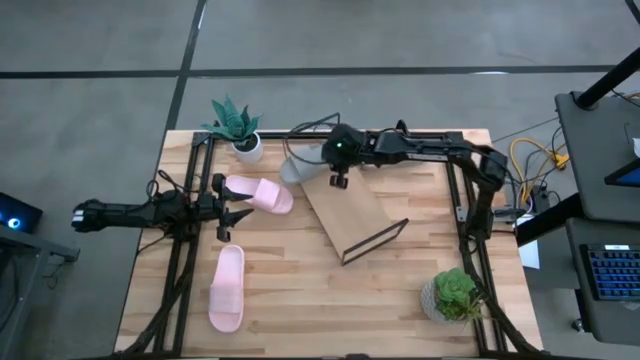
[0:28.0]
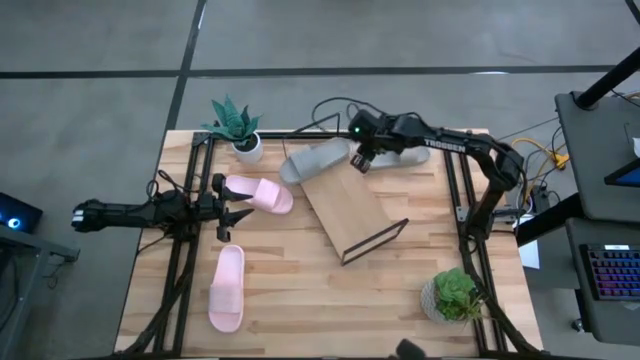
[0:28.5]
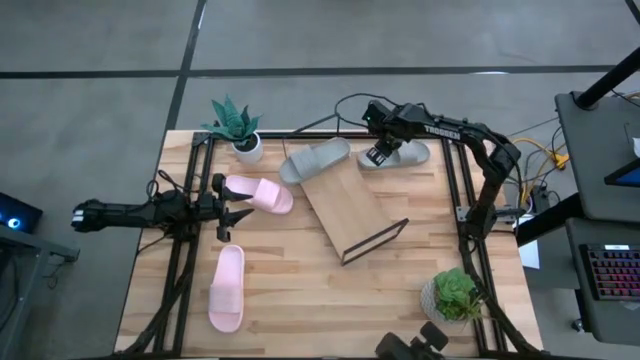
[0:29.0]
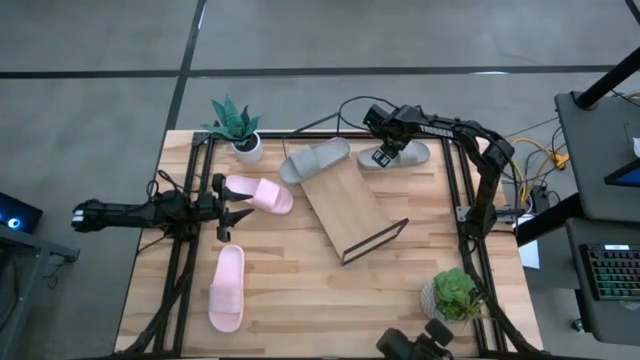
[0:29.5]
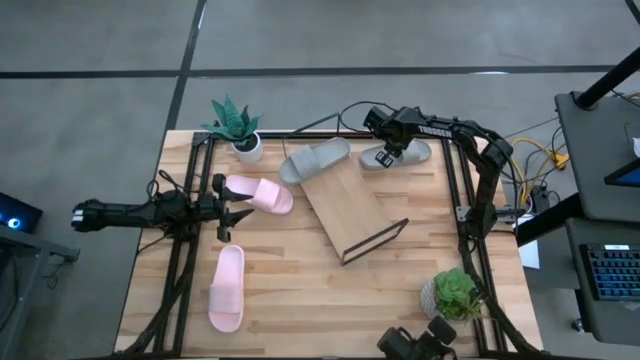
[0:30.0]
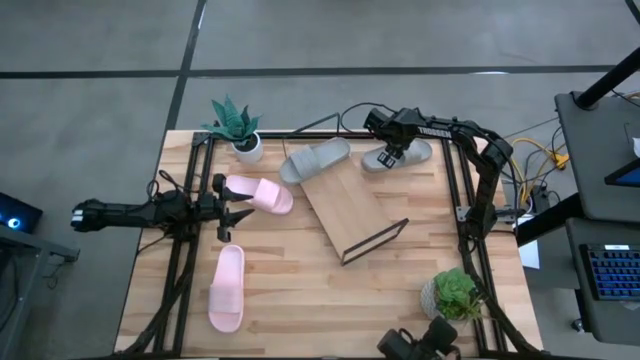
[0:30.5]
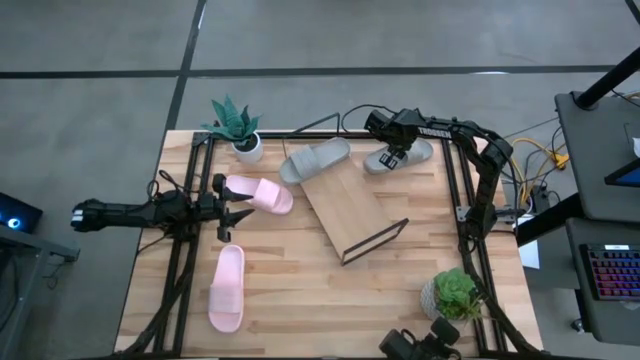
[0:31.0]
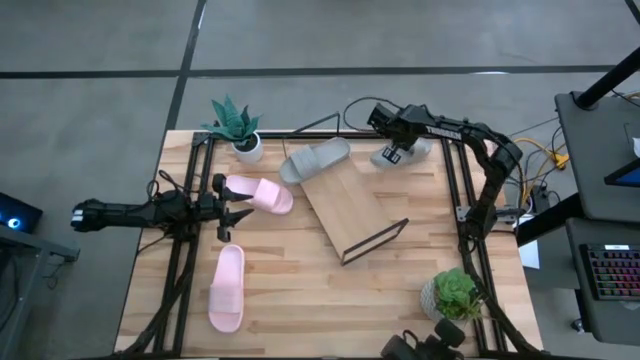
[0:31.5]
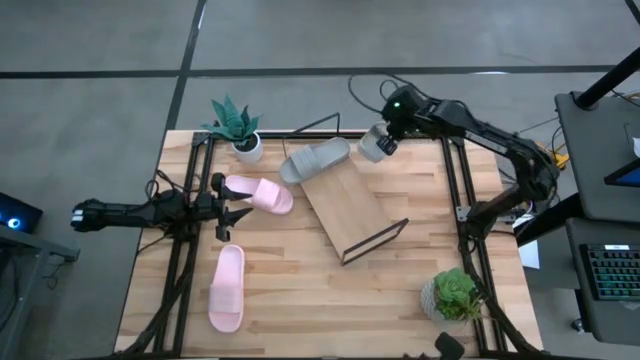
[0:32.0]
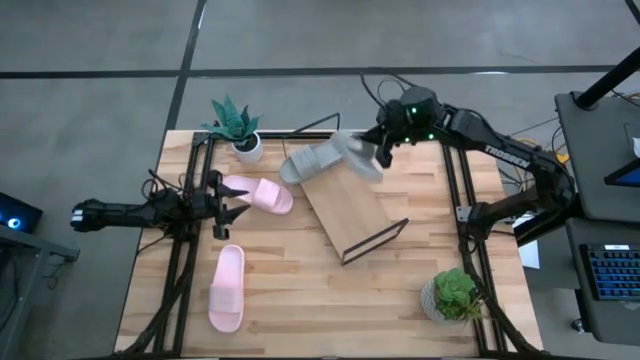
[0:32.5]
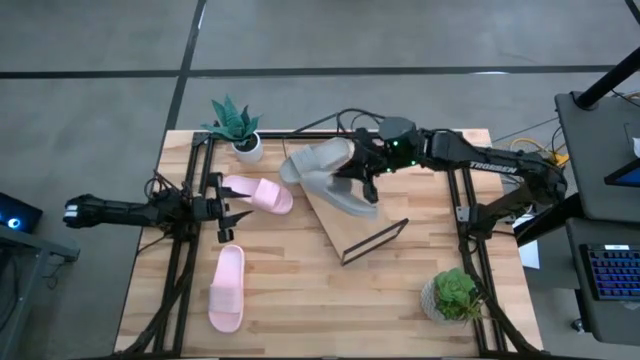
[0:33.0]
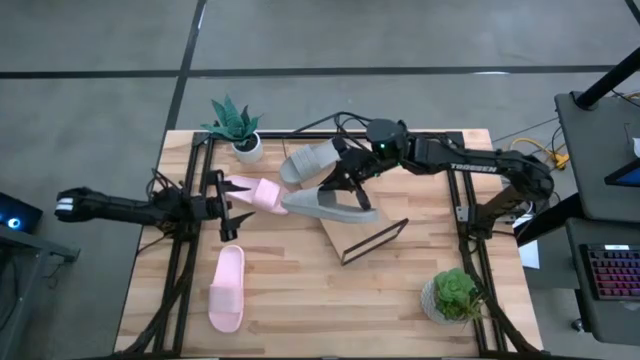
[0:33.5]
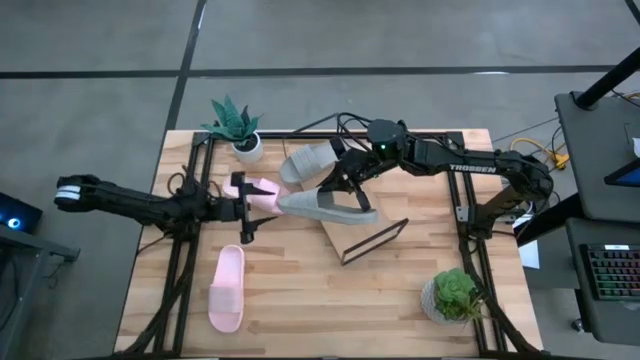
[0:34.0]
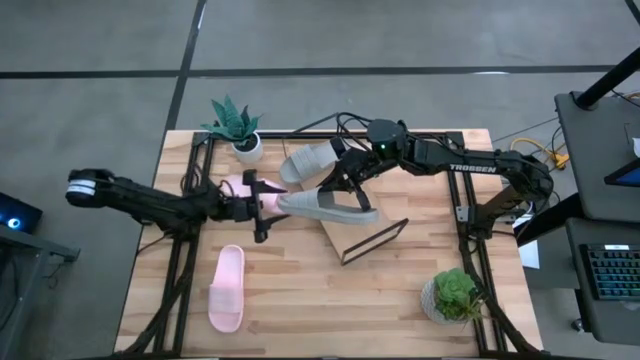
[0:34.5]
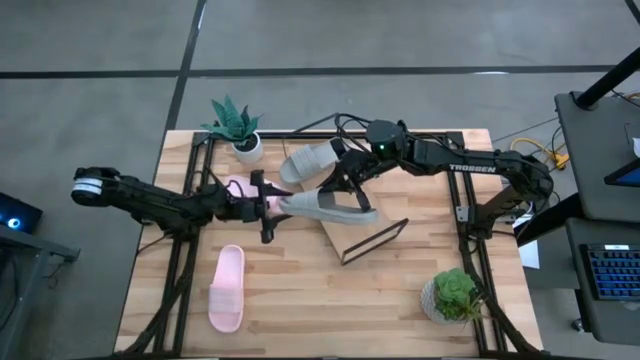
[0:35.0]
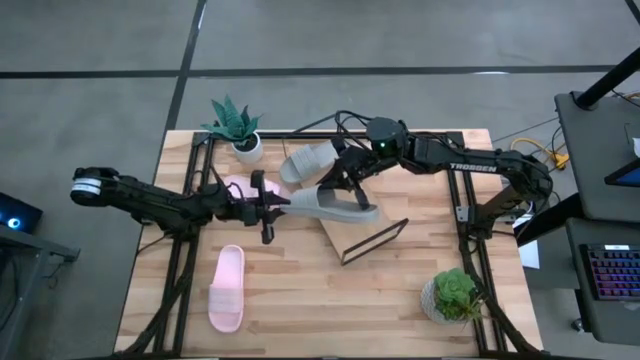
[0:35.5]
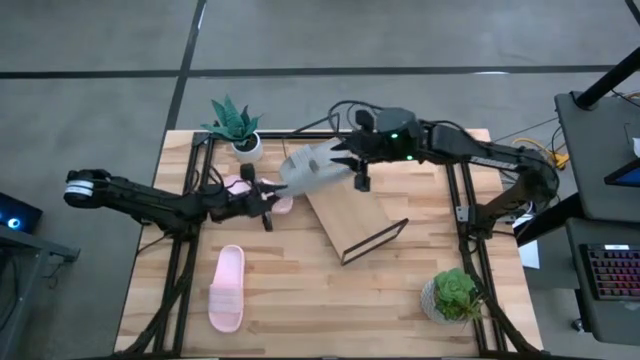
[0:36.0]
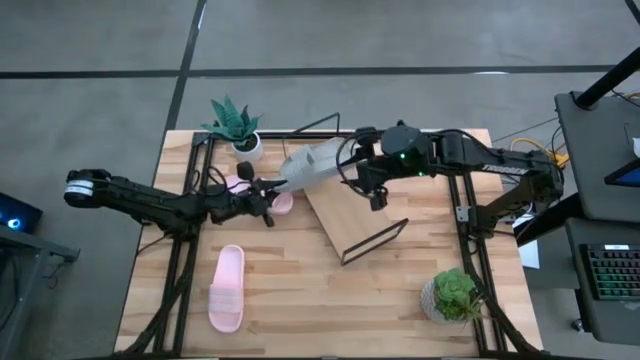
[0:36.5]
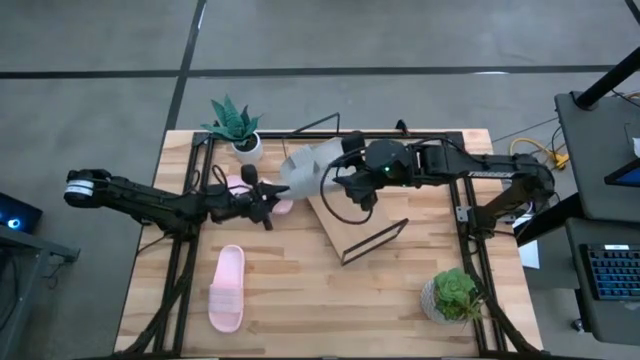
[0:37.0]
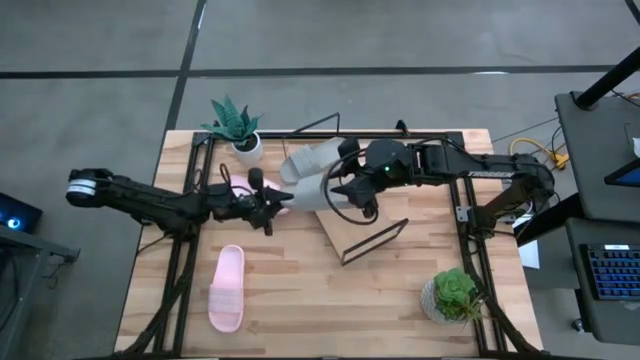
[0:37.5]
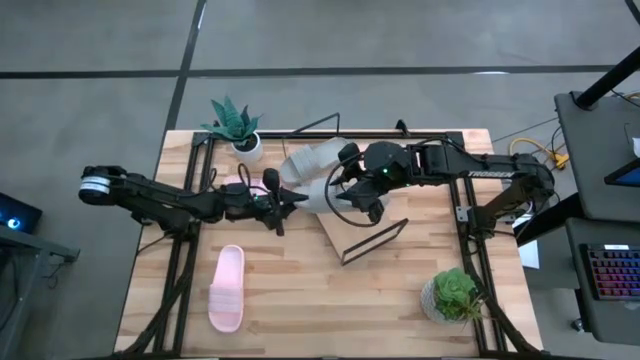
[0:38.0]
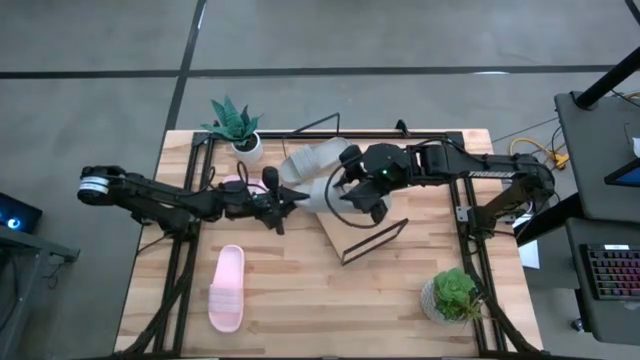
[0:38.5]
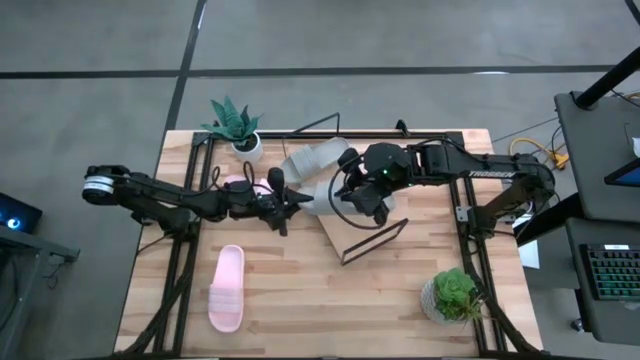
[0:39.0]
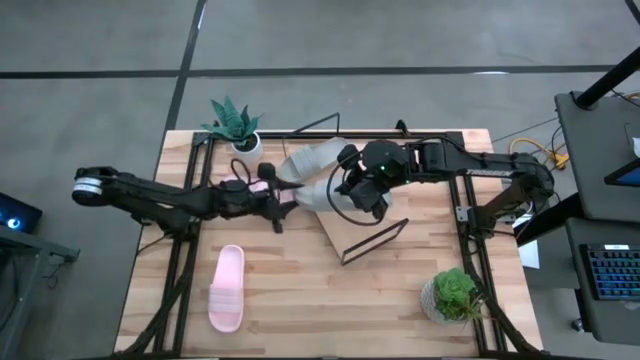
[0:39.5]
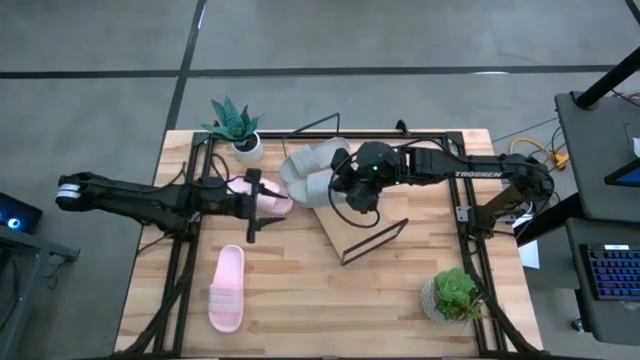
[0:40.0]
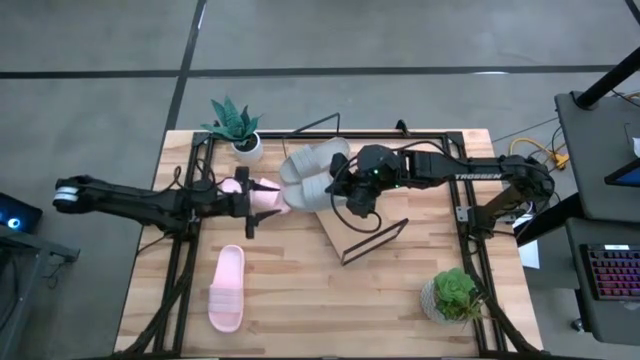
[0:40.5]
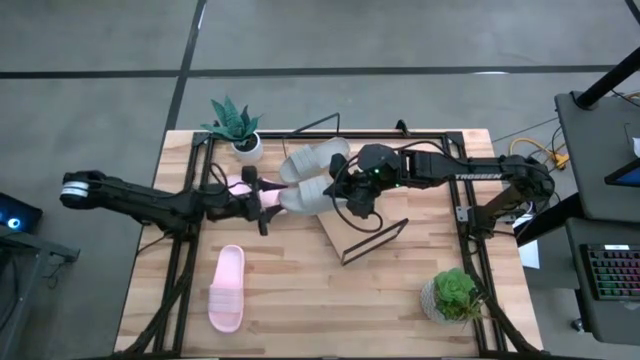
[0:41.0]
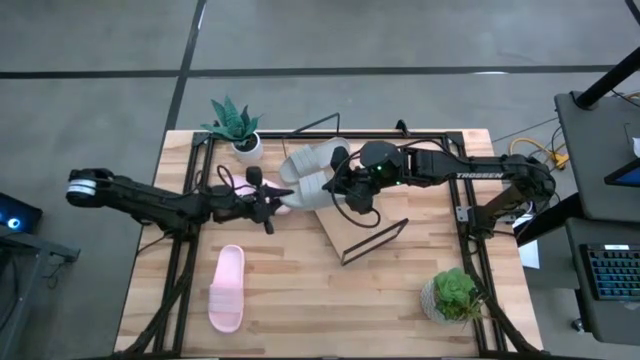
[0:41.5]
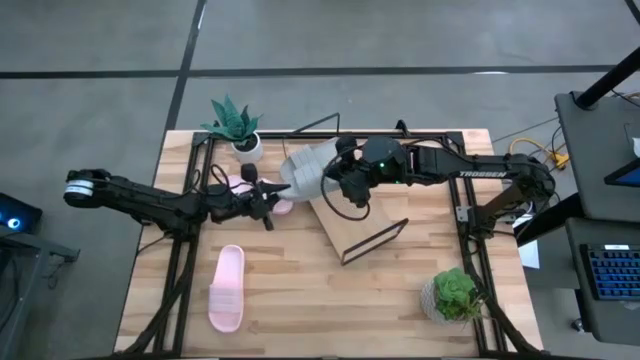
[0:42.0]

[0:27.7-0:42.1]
Task: Pick and place slides into the shelf
Put the gray slide on the shelf

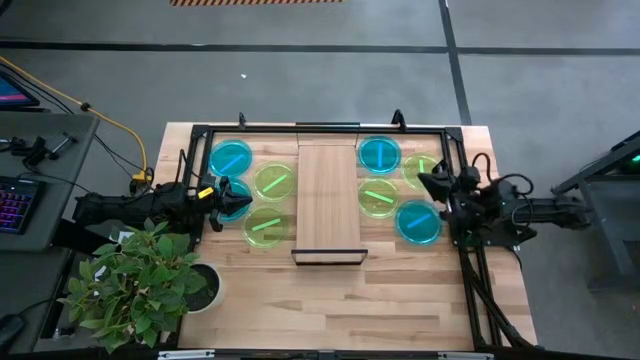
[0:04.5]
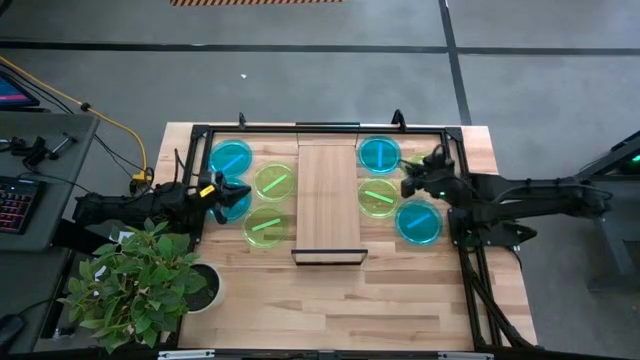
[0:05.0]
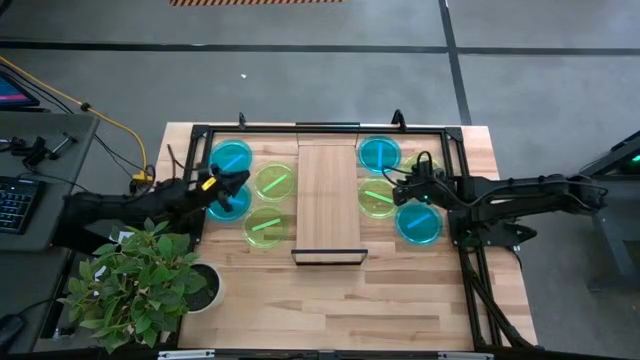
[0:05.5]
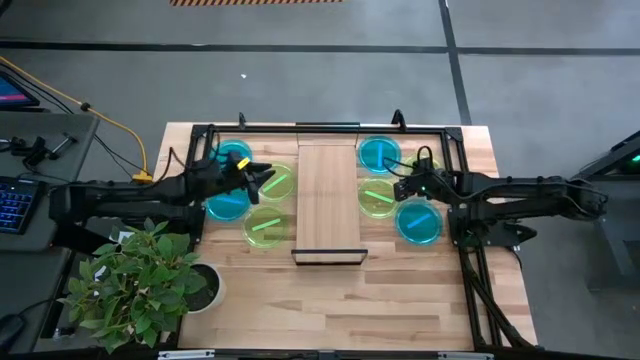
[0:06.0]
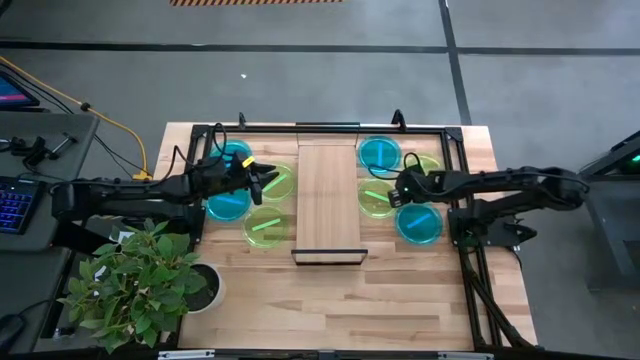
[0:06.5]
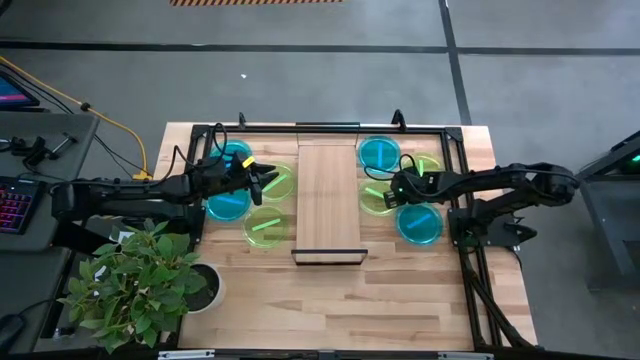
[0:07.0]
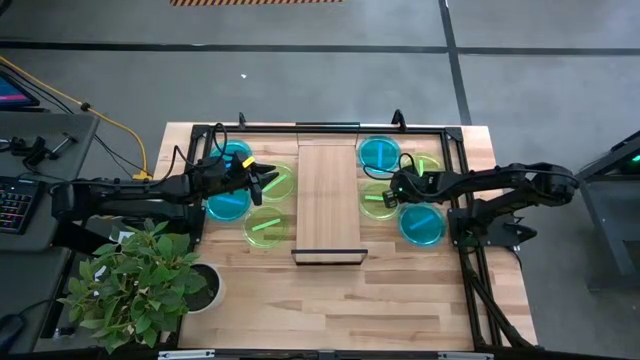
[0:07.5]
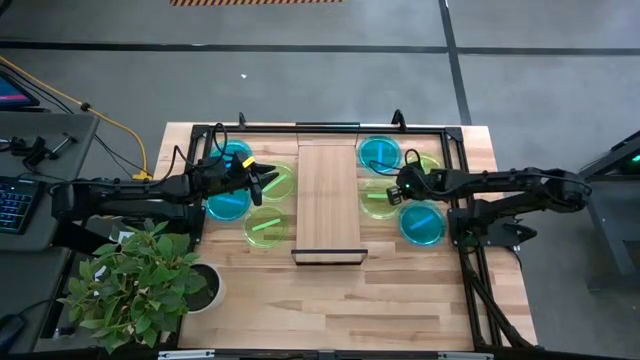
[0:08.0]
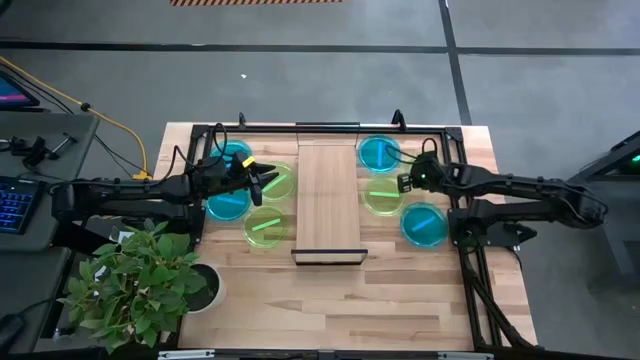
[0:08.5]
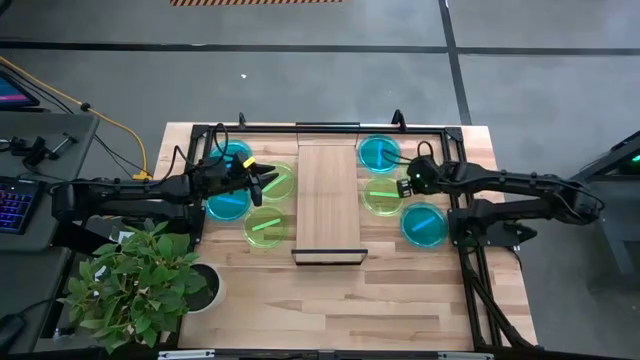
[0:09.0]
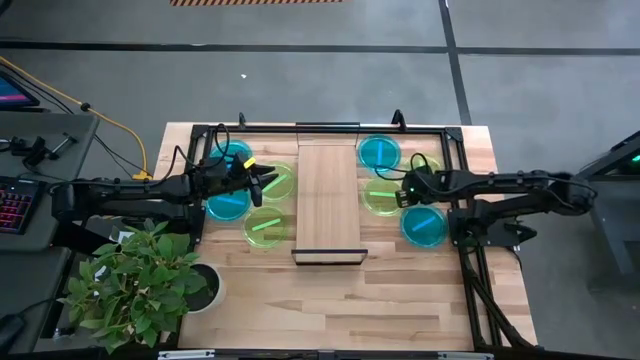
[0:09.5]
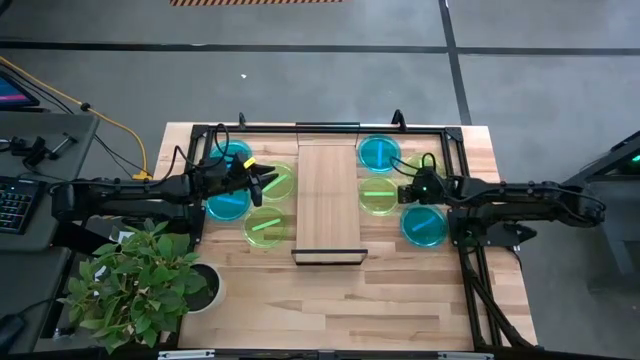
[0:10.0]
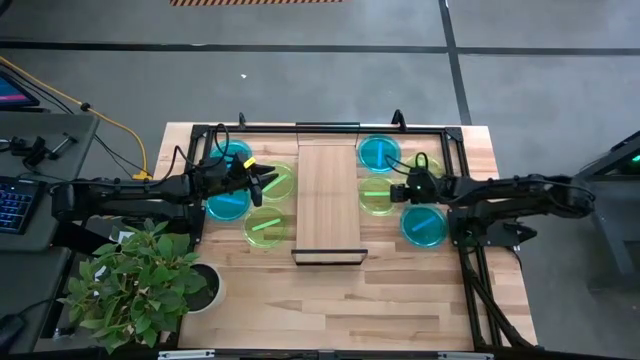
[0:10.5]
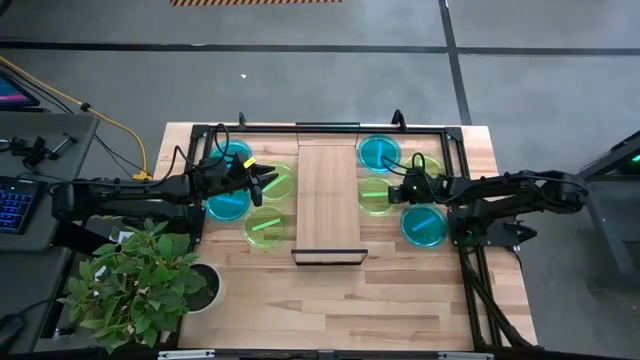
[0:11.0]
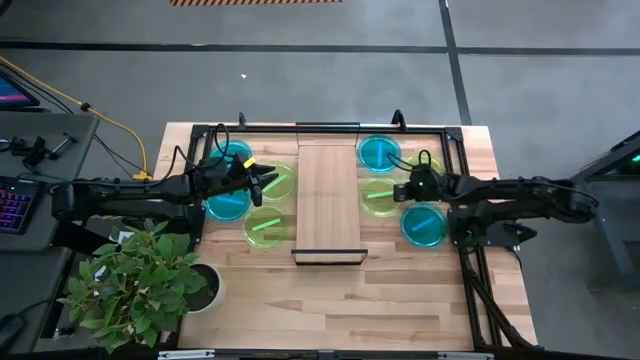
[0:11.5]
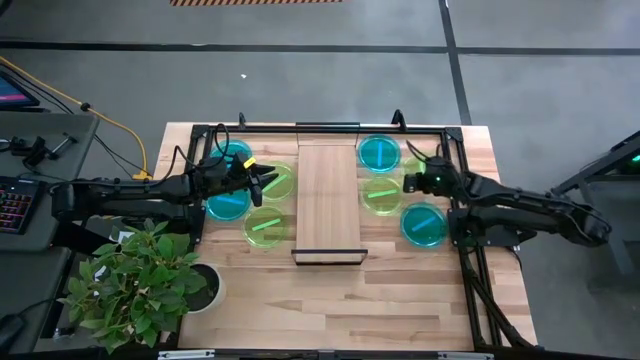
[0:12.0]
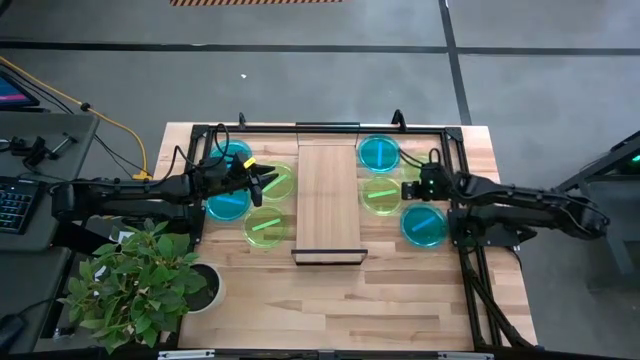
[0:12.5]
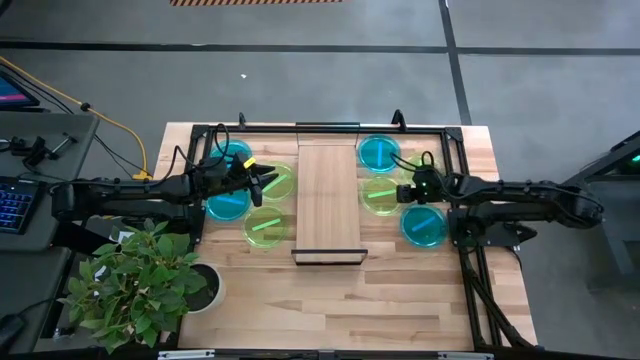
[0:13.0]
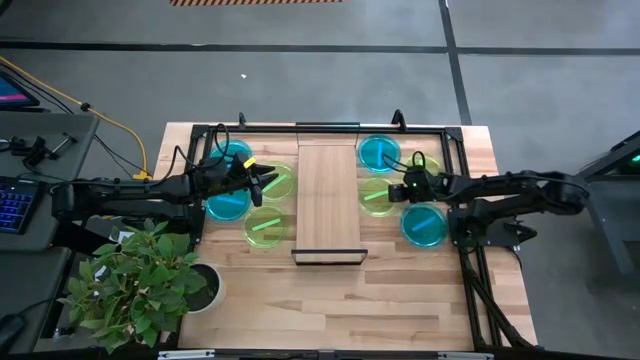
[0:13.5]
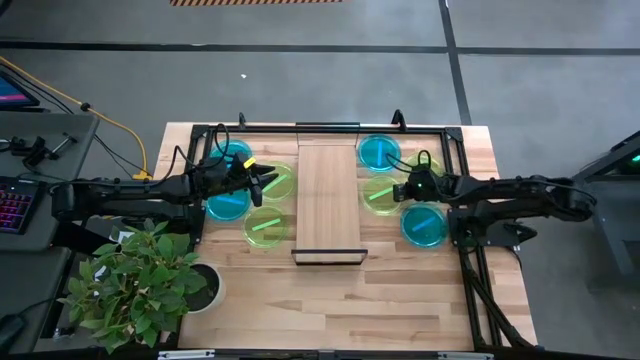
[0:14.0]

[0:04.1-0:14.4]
Task: Place and stack plates onto a shelf
Put the middle green plate on the shelf
